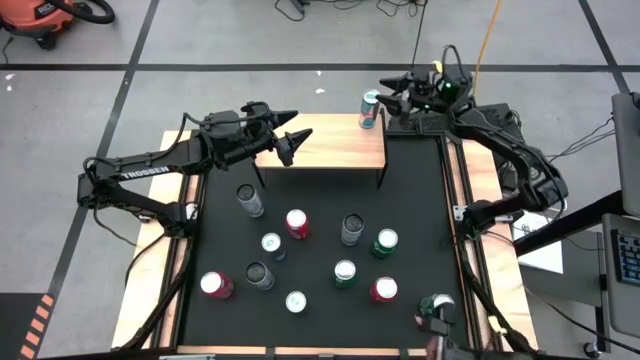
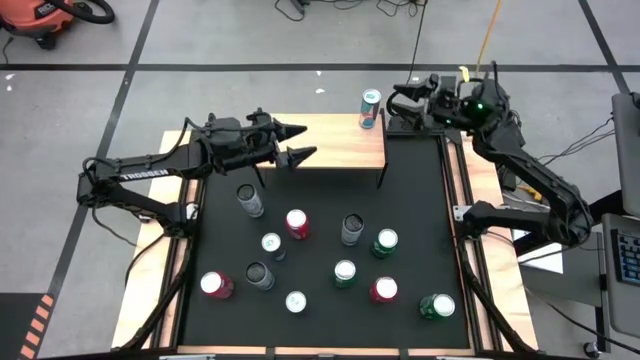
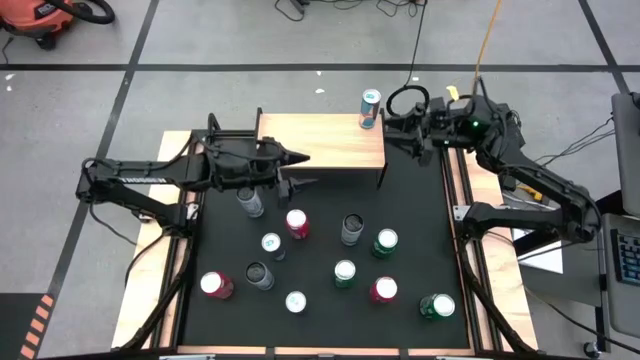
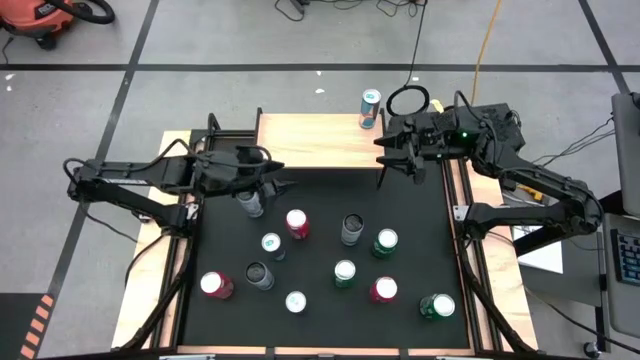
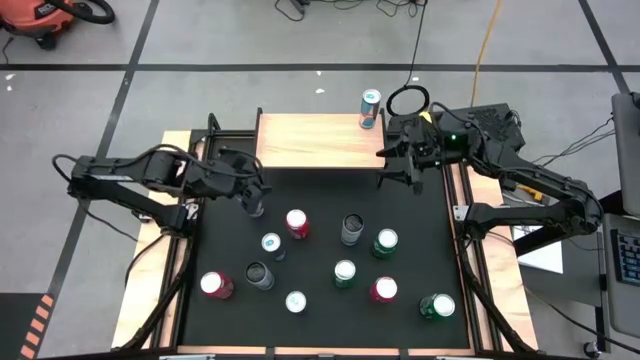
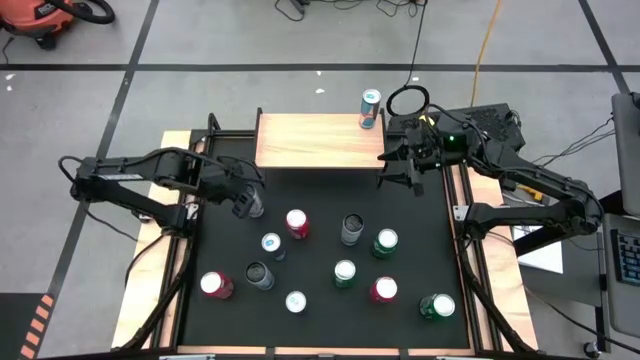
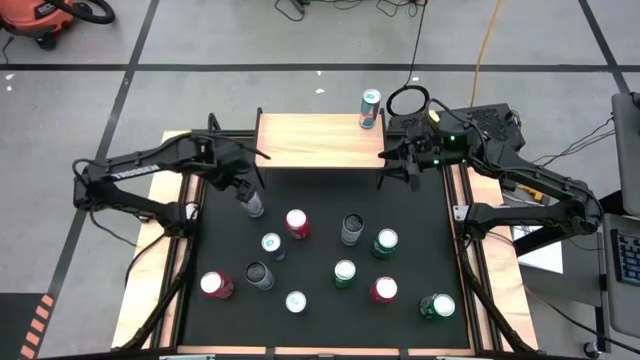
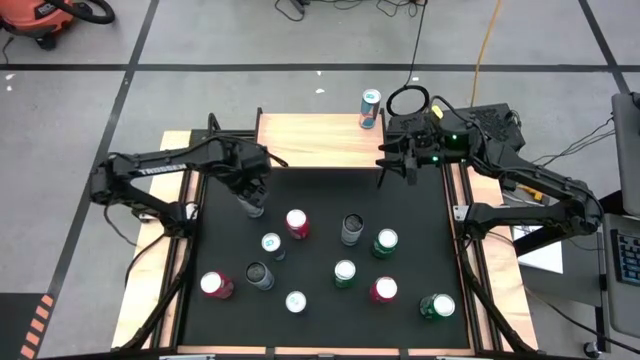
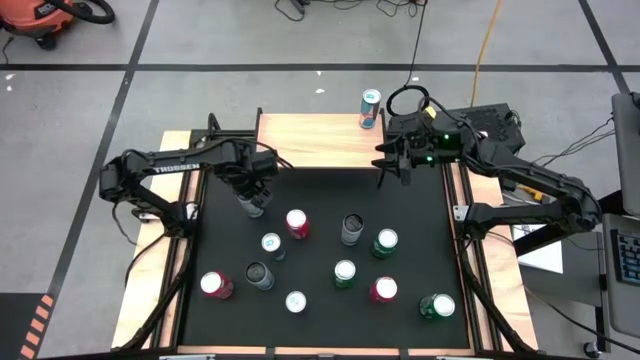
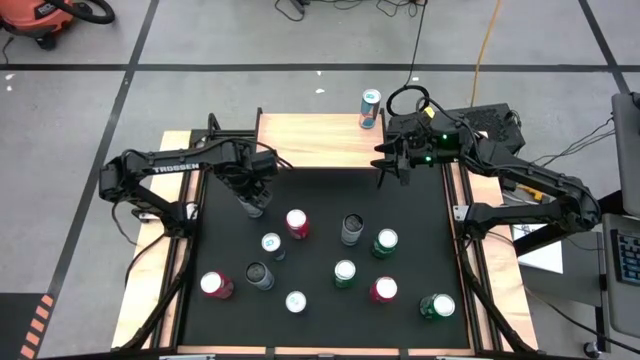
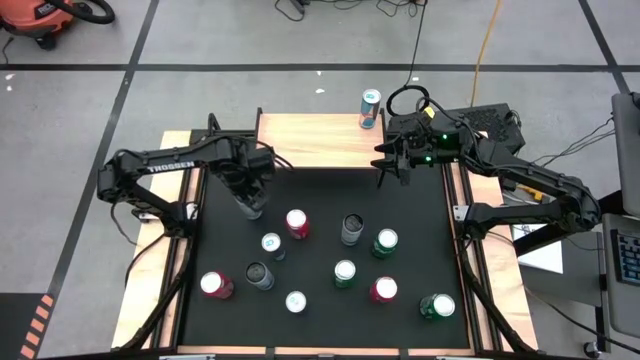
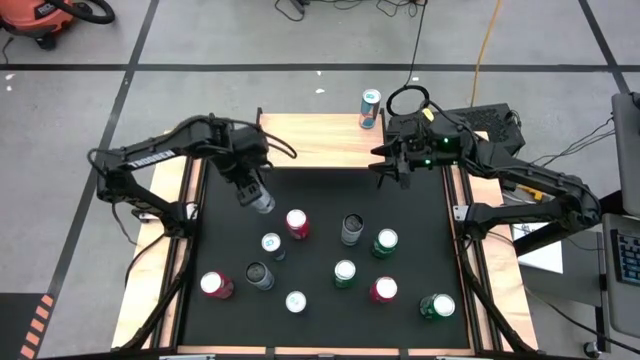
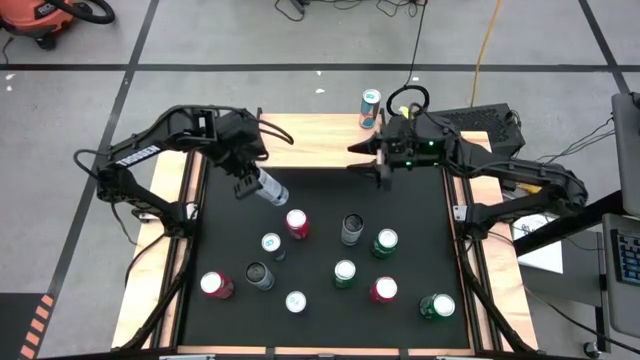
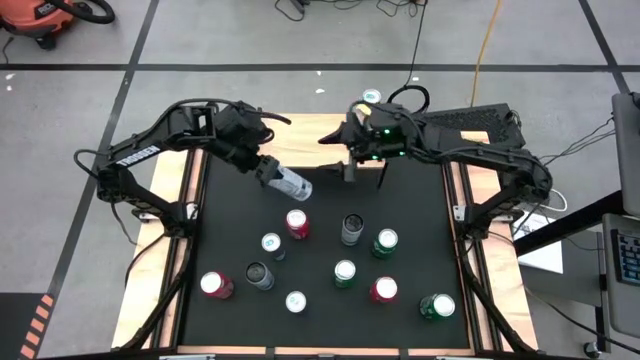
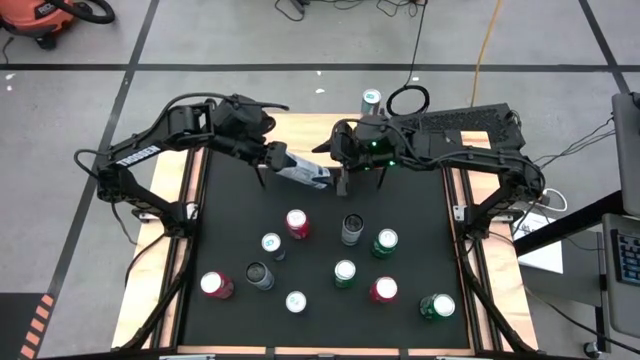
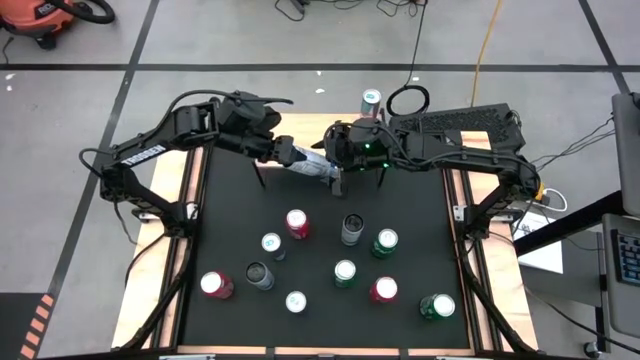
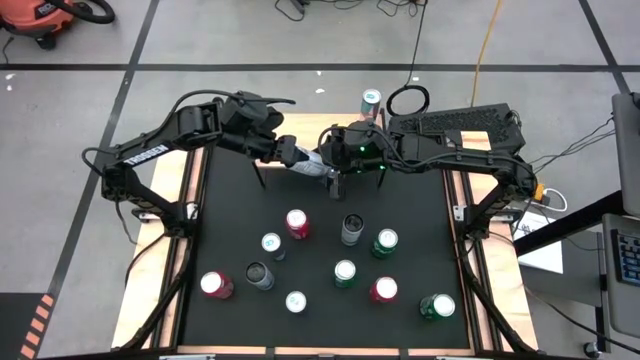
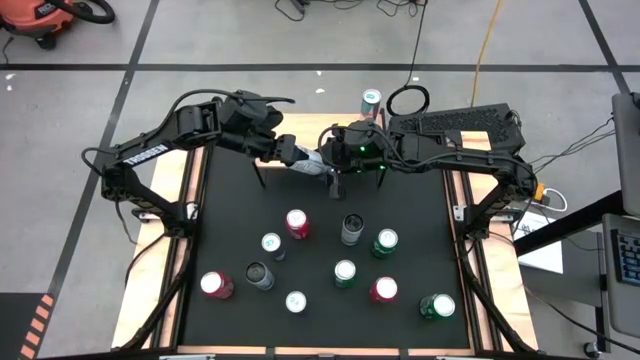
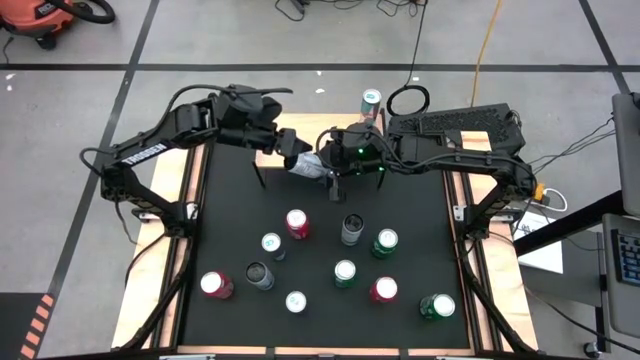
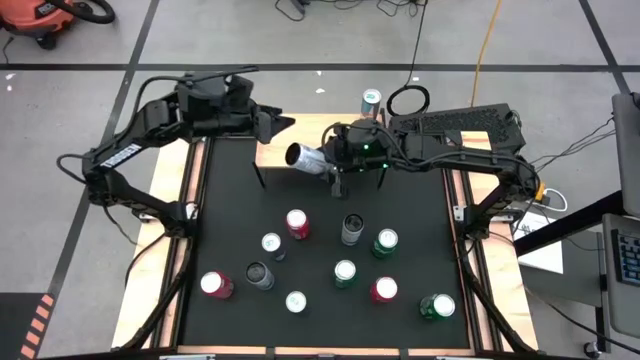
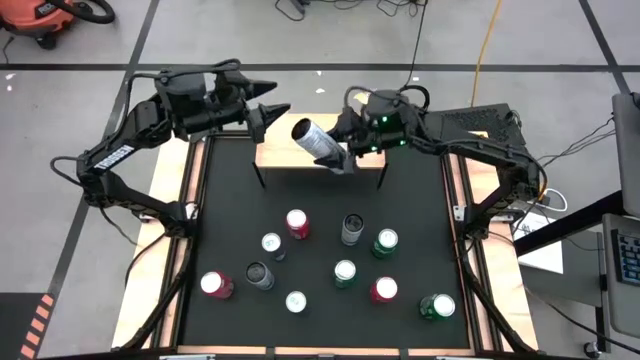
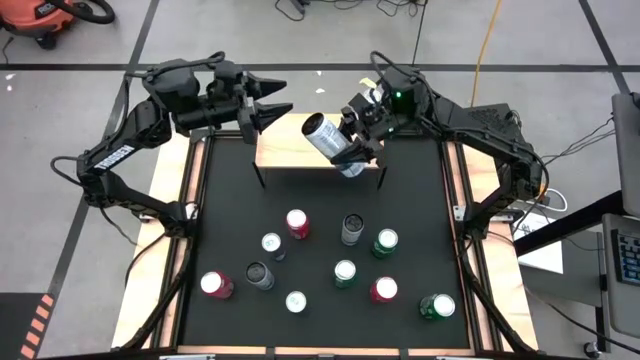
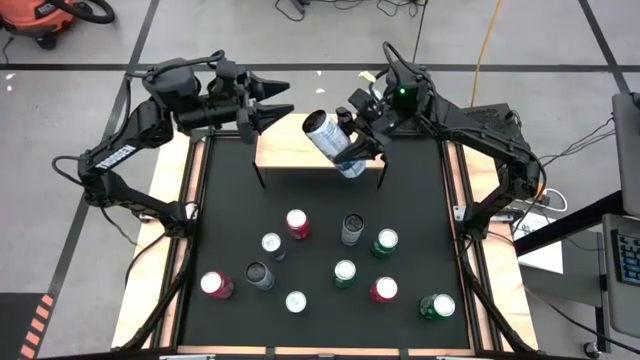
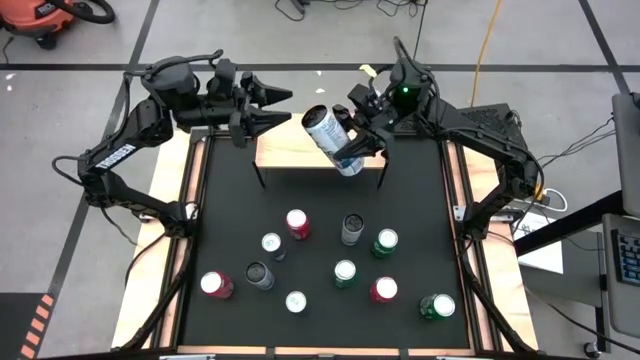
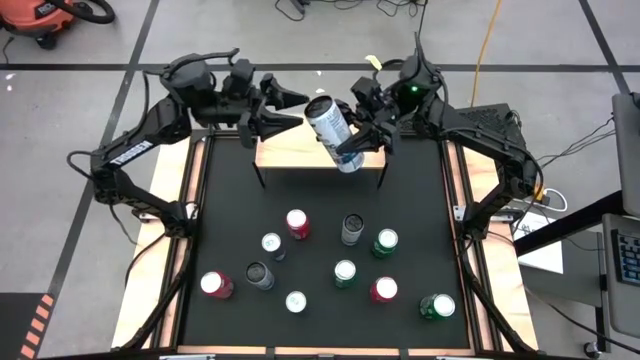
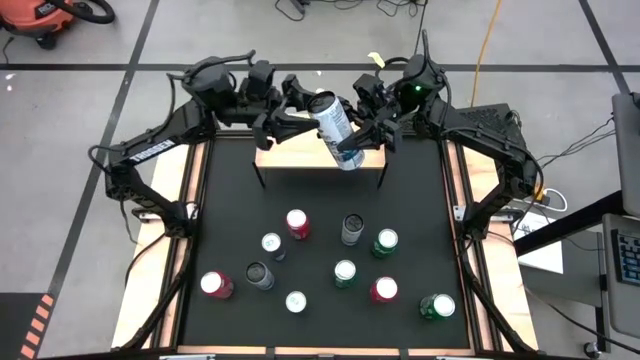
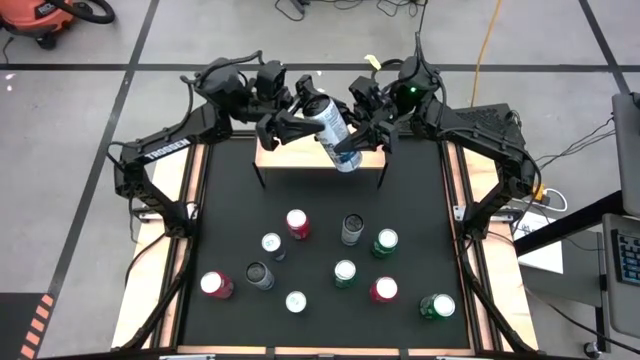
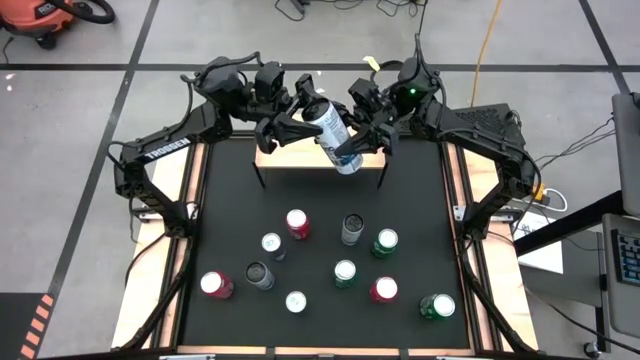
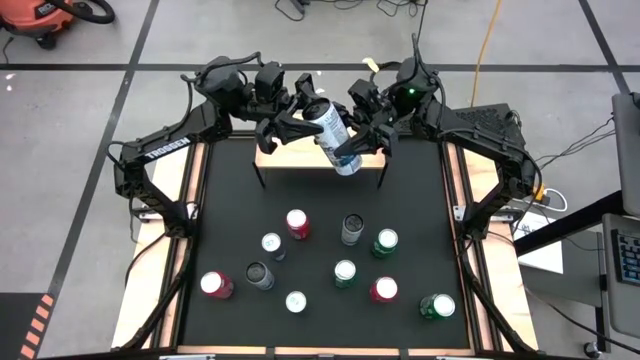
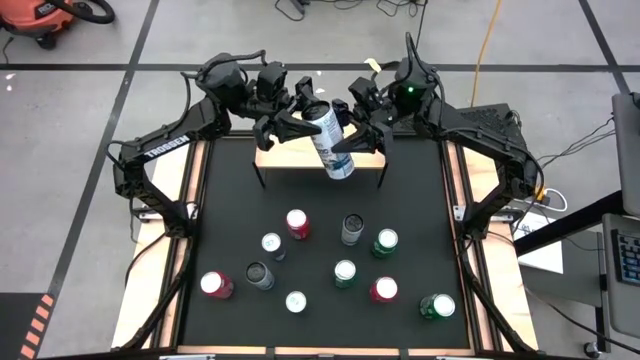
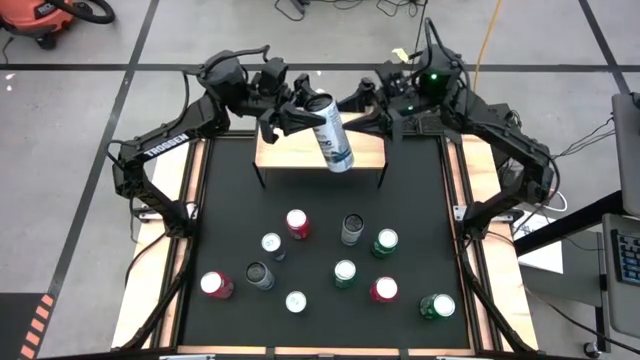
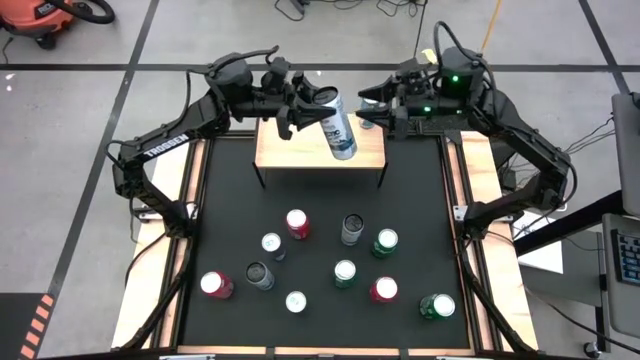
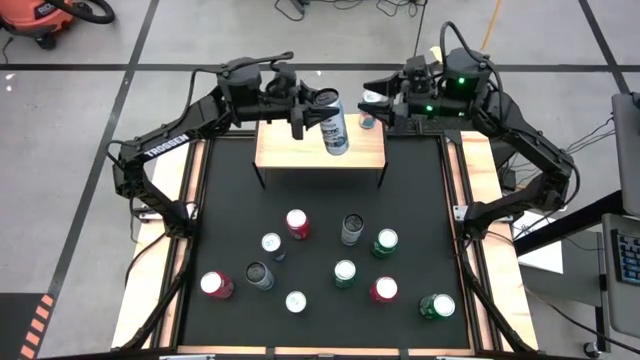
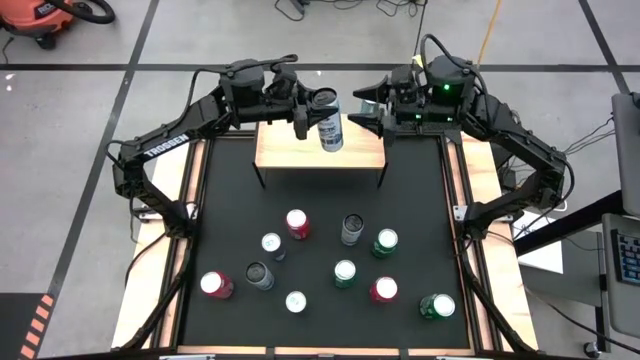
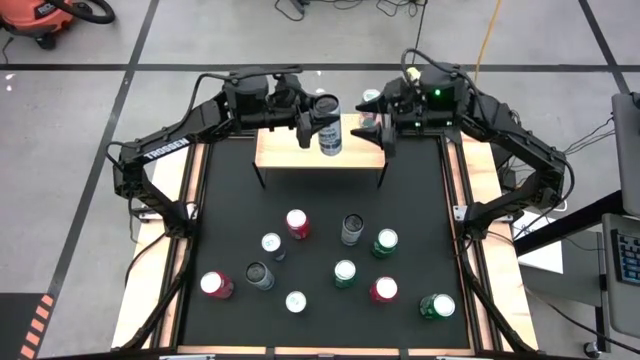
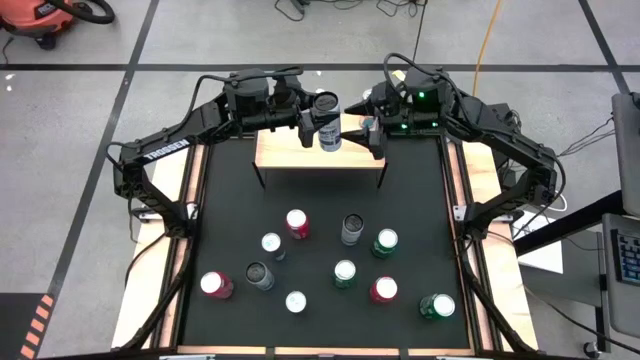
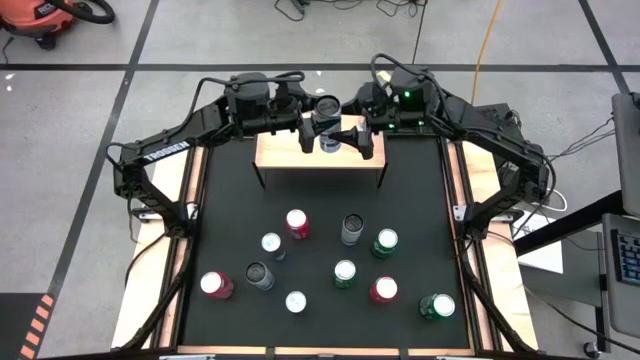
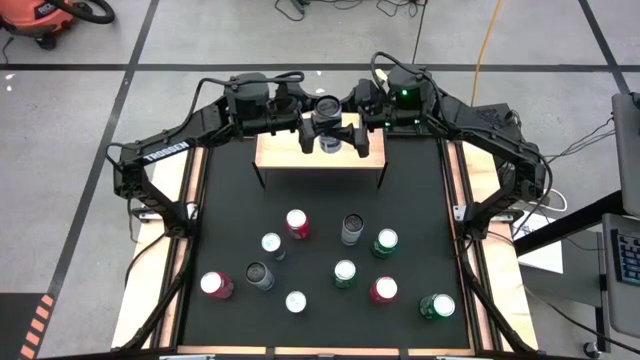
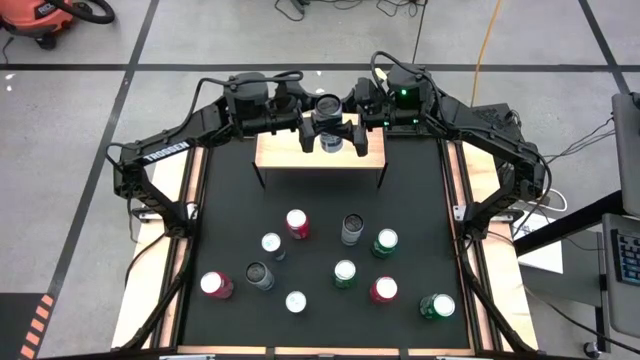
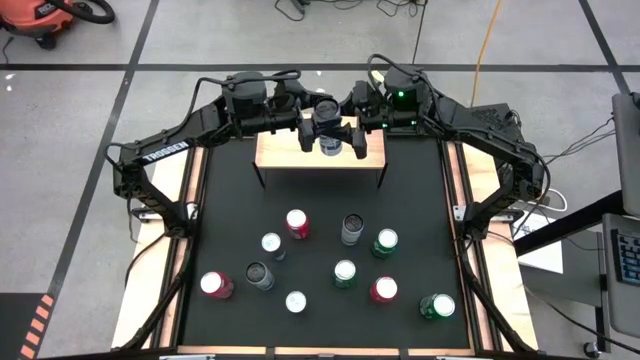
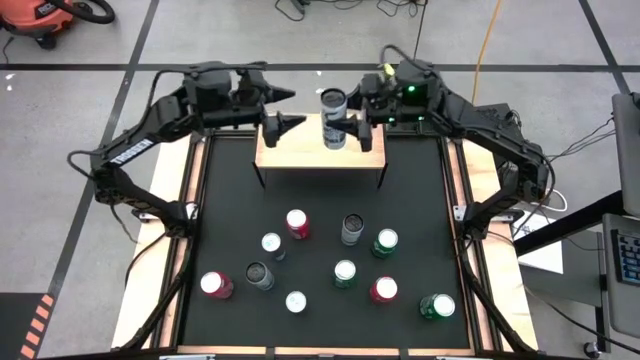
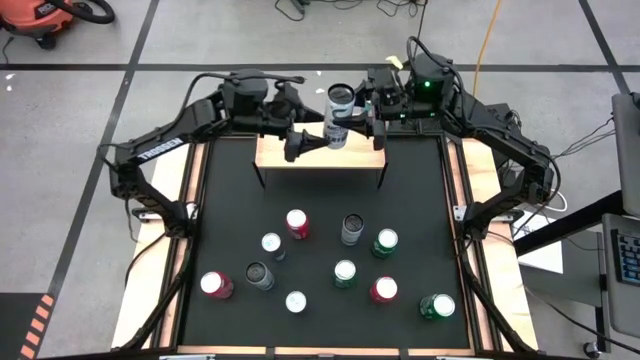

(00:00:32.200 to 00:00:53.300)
Task: Place canned beverage on shelf
Put the top left white soda can on the shelf
